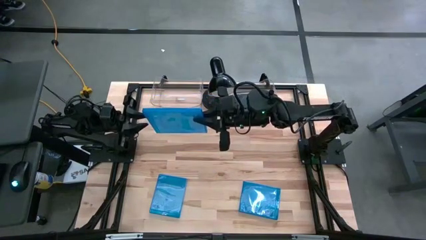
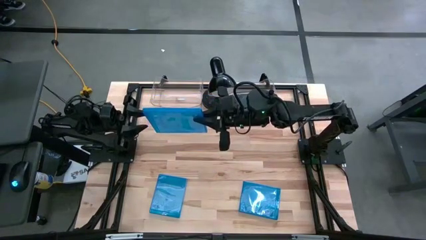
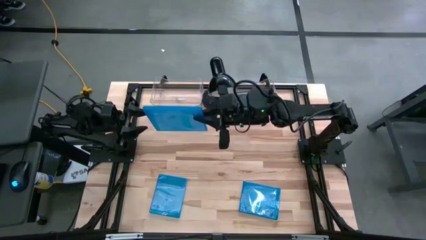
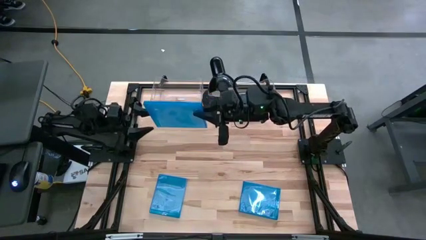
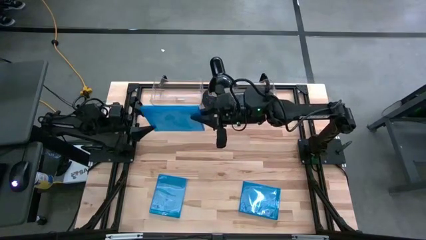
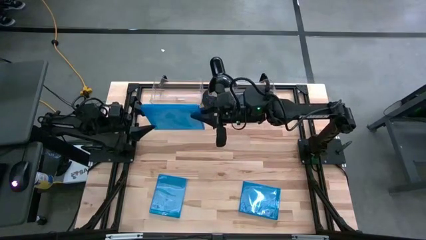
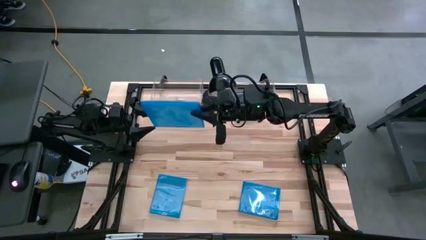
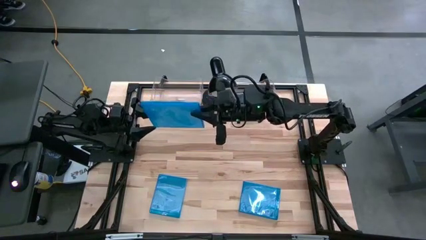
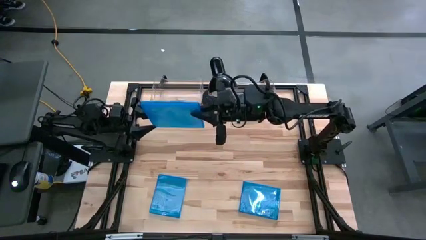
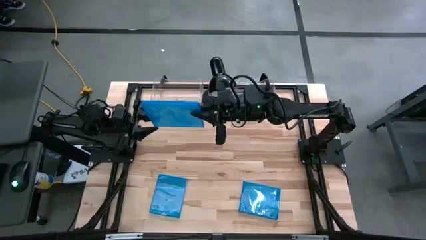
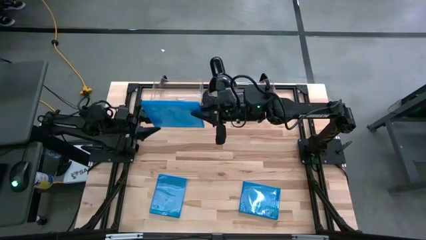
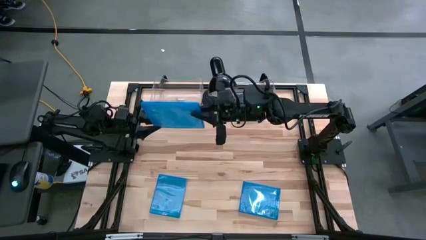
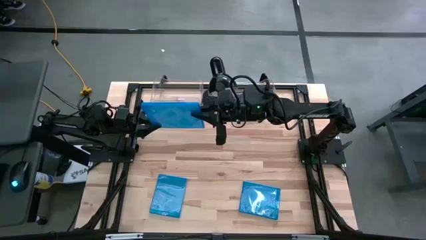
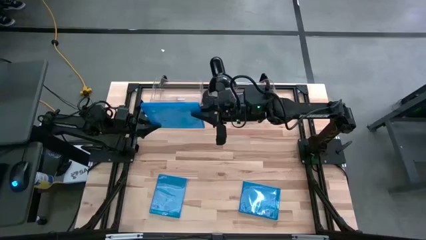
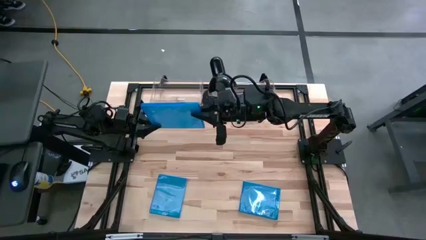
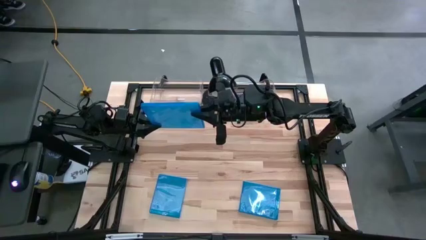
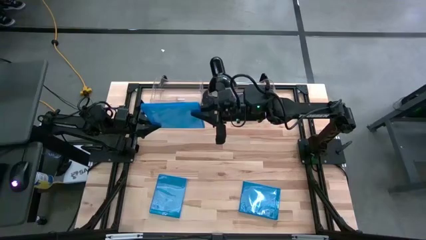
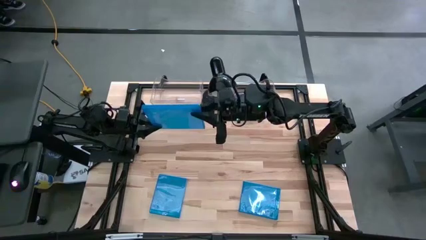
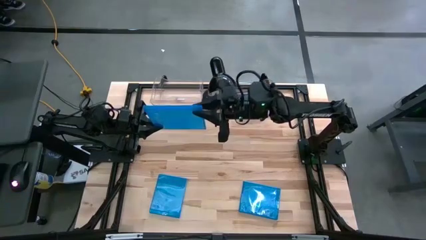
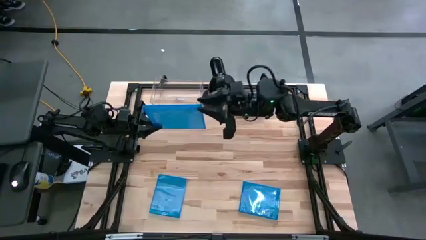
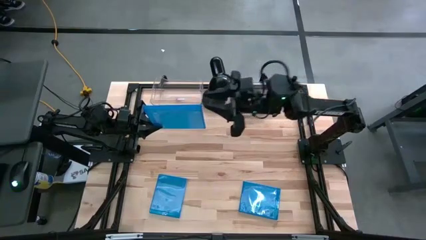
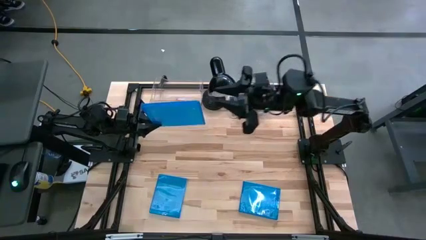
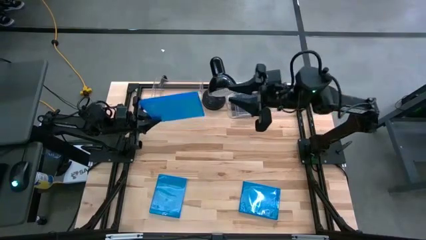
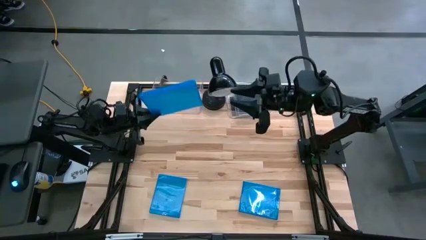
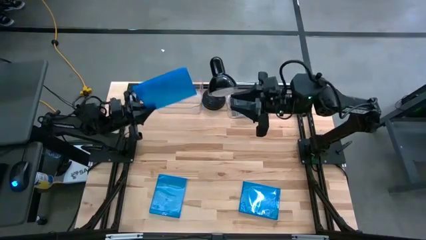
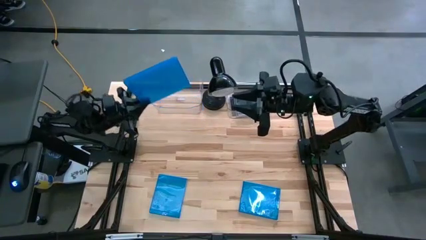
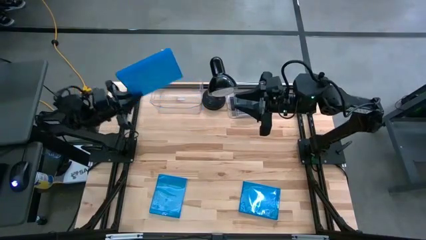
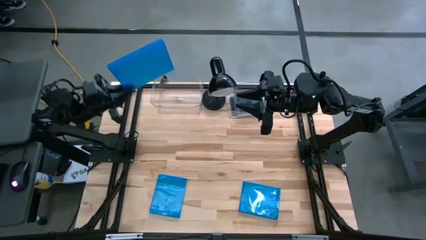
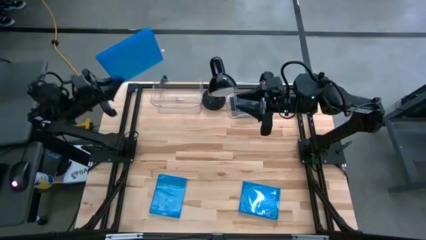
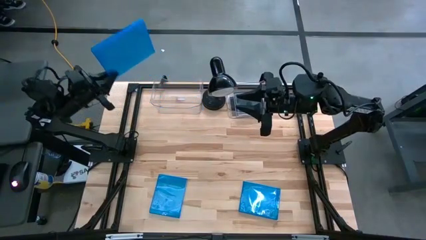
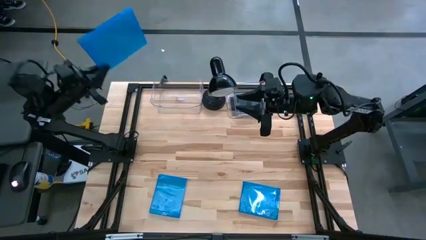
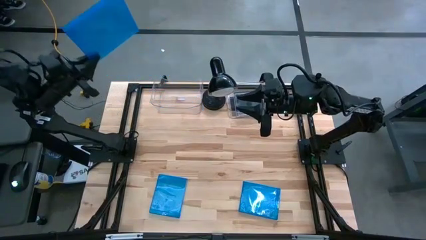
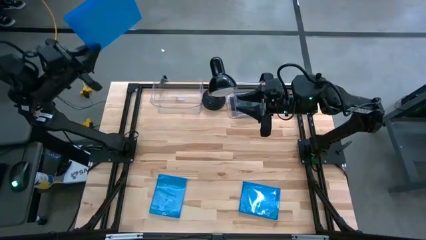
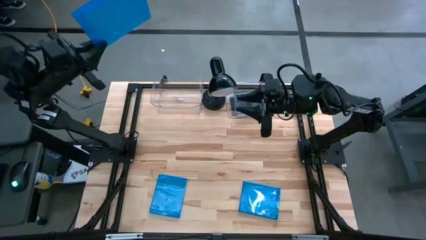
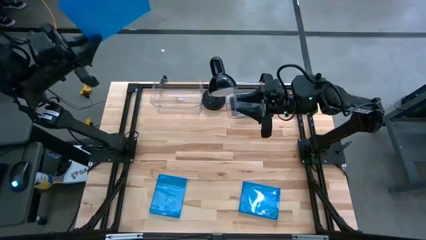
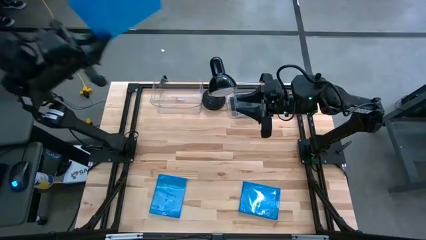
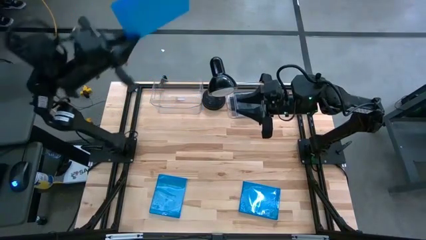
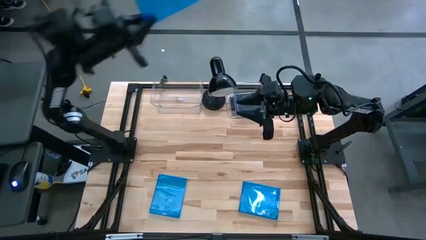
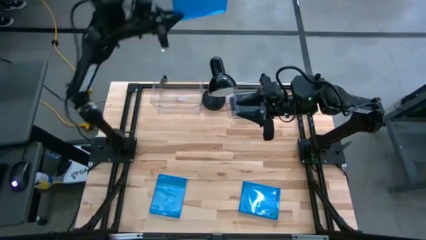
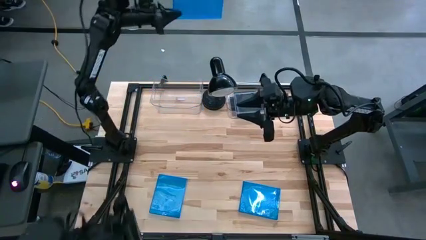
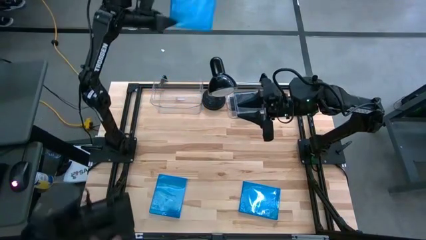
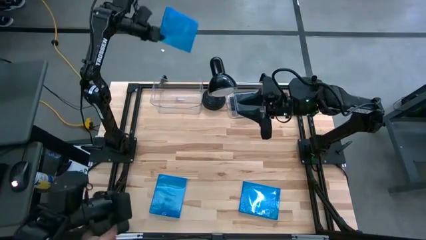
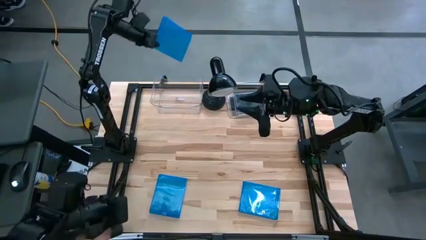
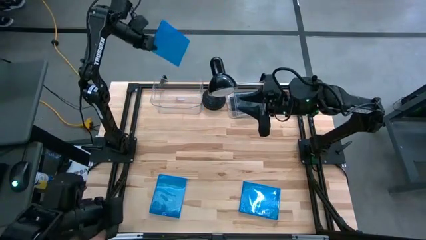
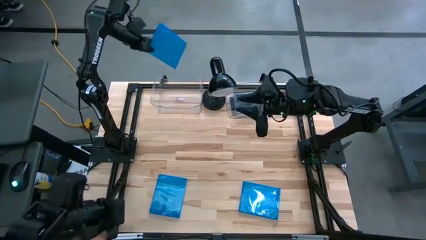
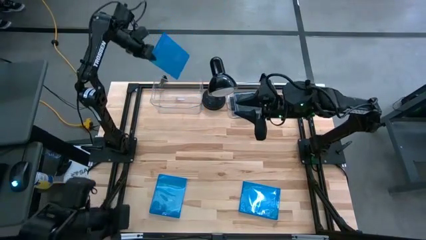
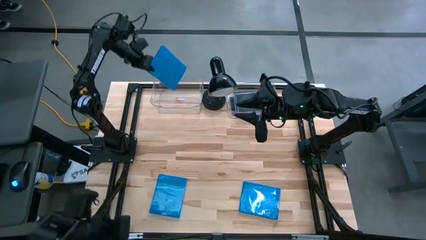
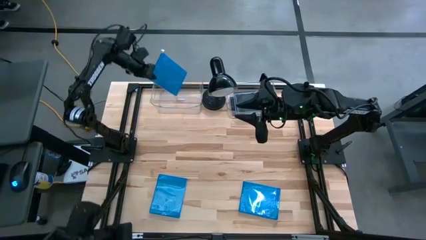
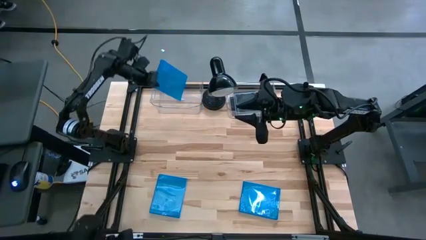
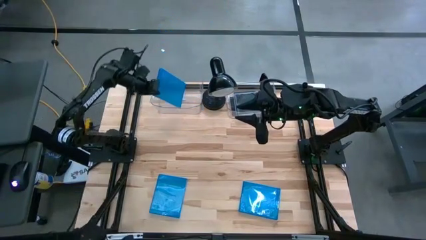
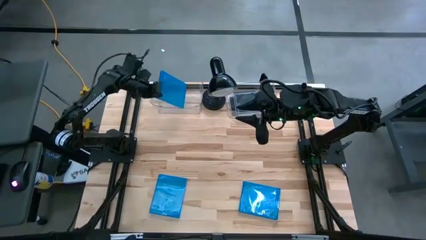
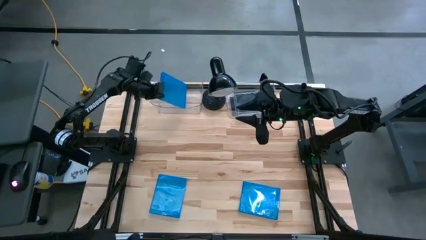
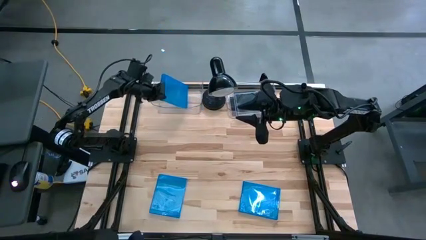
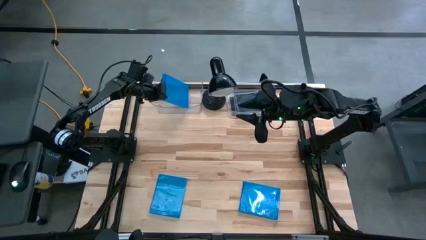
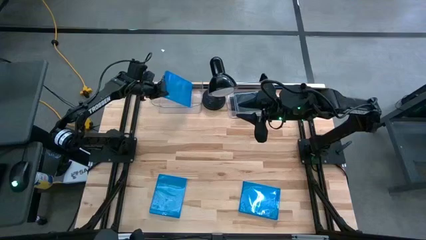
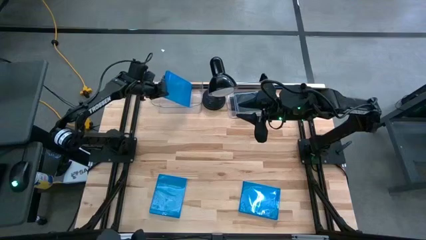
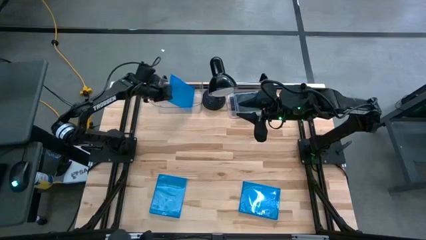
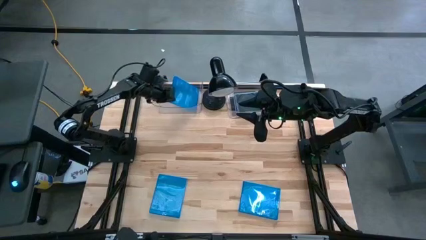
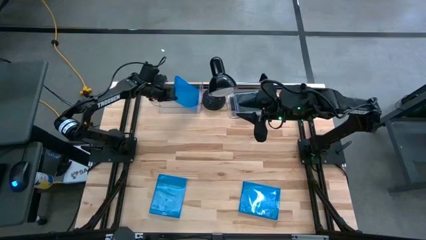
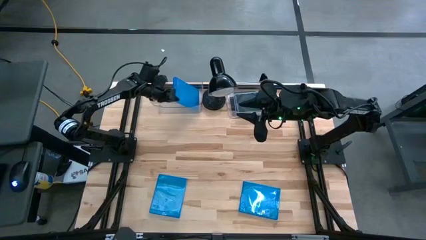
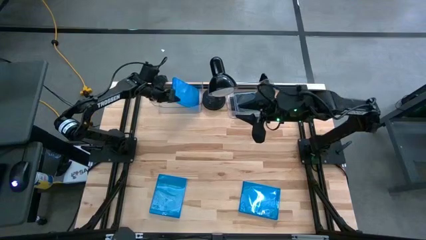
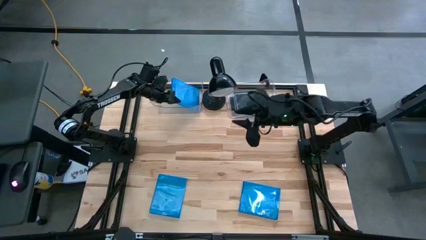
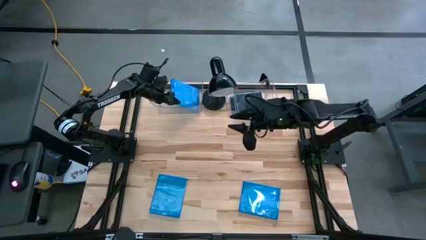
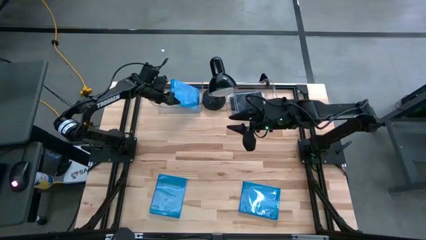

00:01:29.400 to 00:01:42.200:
Task: Pick & place jewel cases by type
Put the top left blue CD case into the left transparent bin

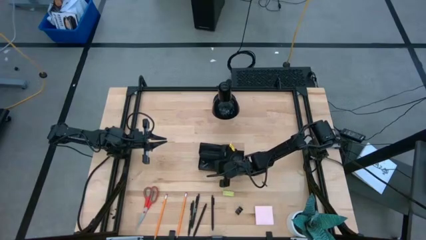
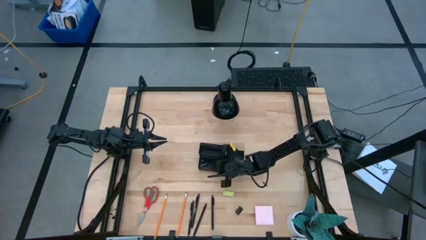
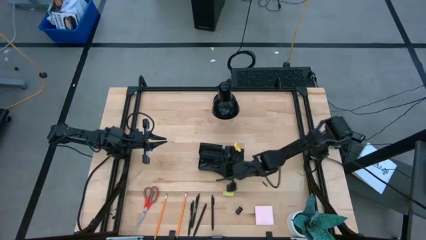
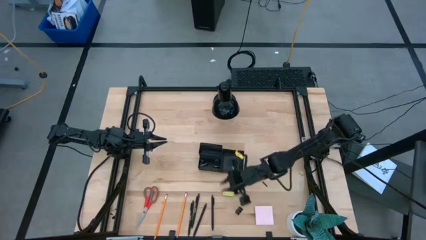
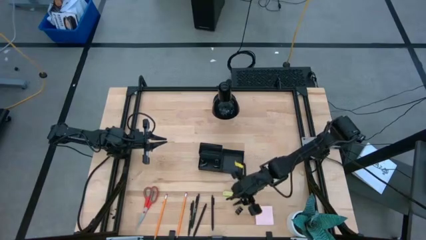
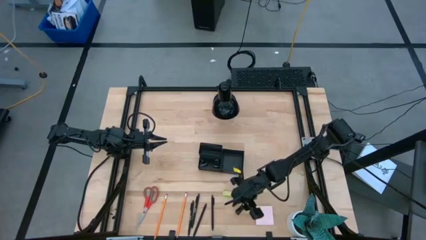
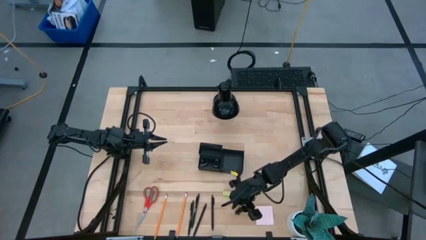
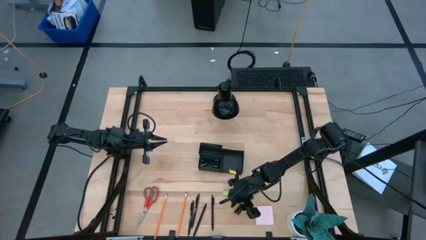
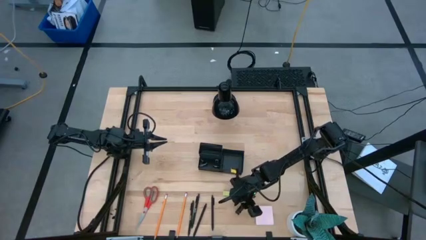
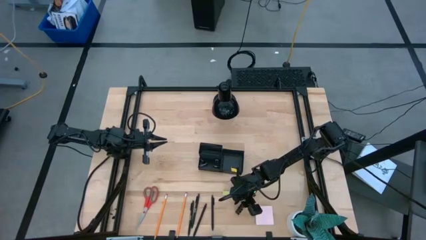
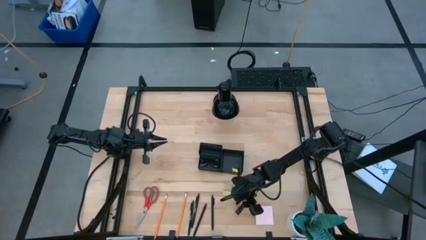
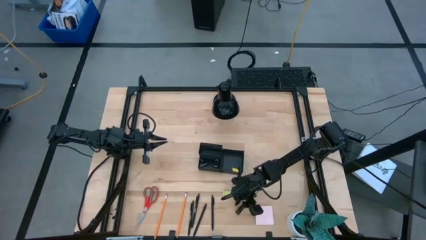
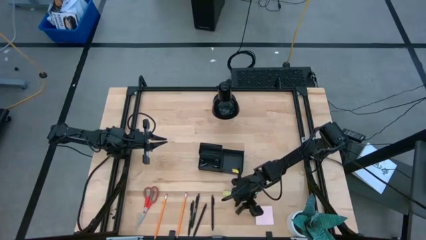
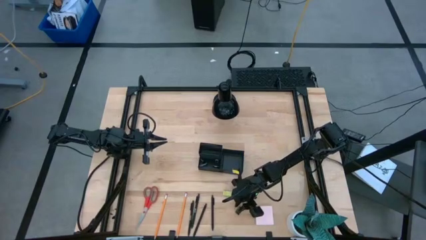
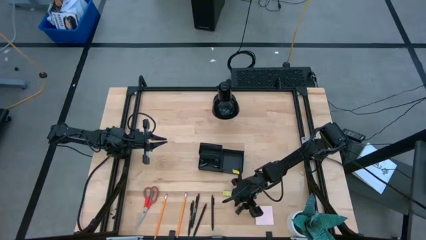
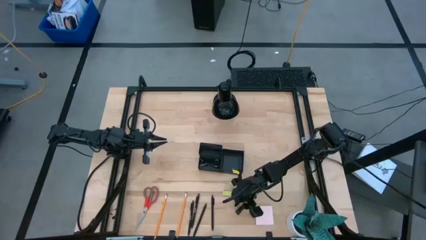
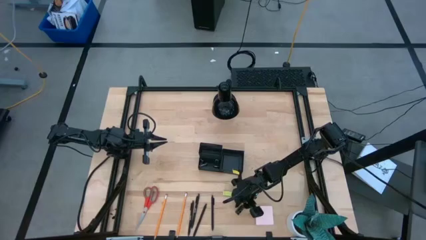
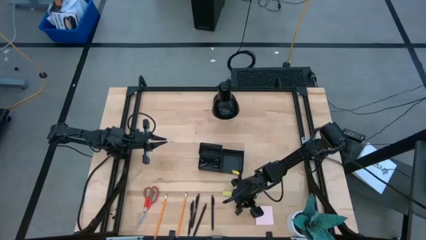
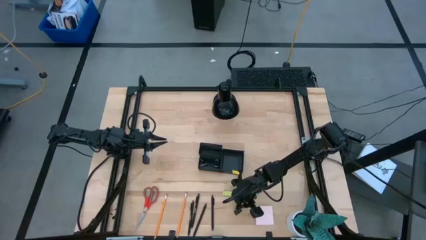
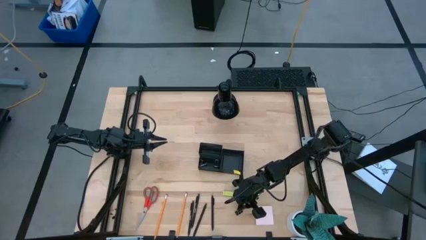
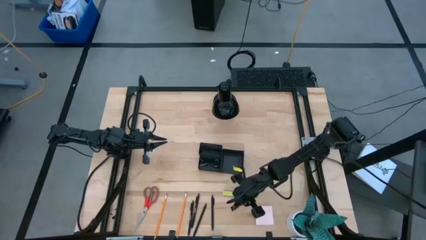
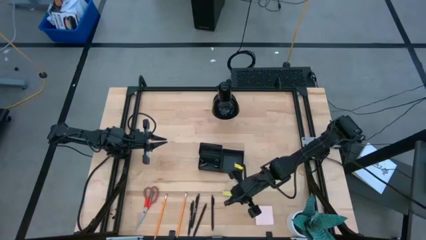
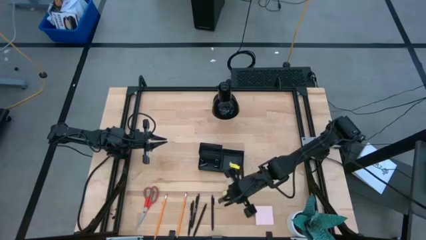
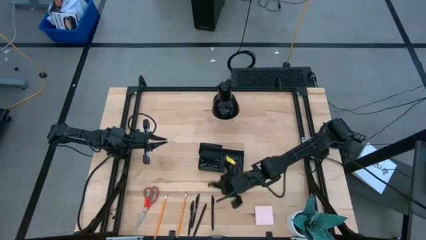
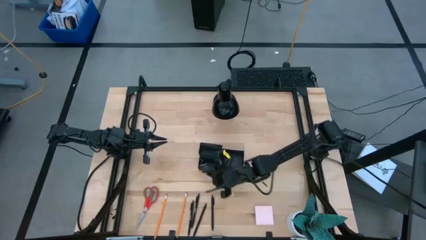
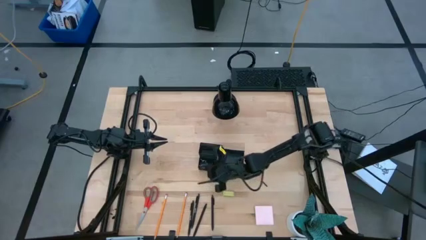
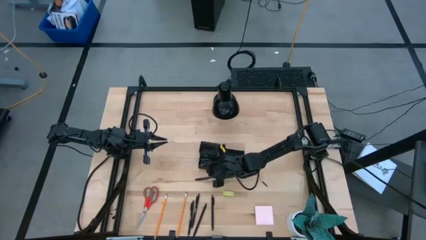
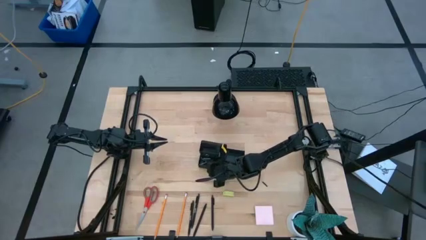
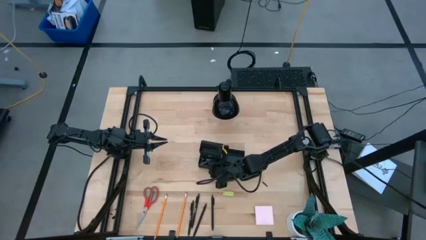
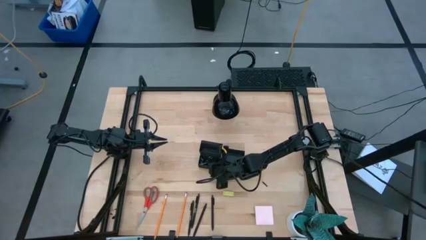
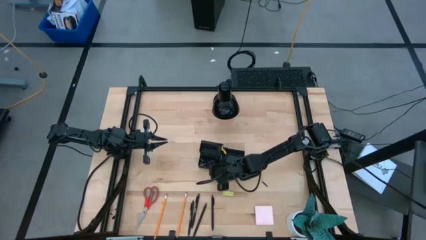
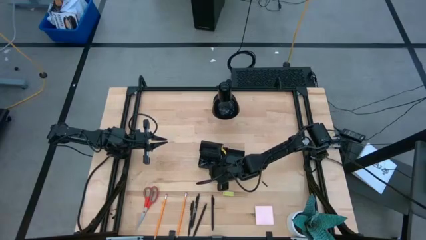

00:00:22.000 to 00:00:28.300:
Task: Pick and place office supplies into organizer
Put the binder clip into the bottom left section of the desk organizer
